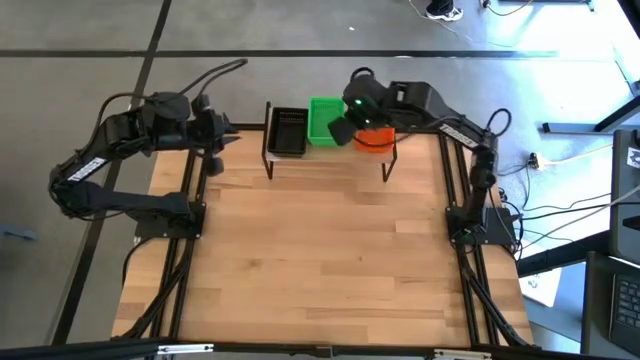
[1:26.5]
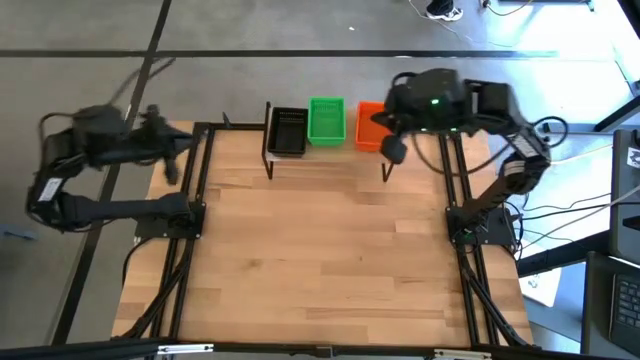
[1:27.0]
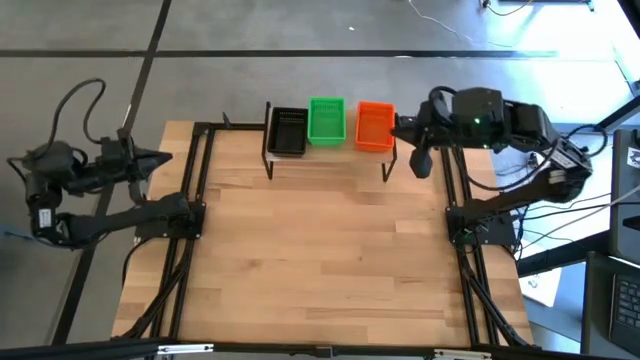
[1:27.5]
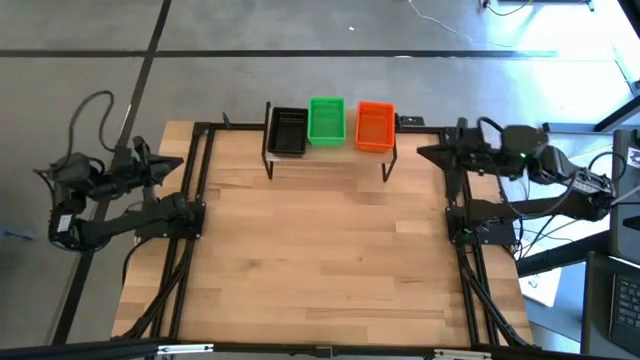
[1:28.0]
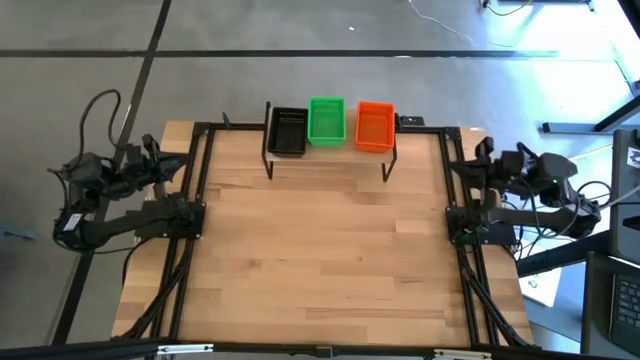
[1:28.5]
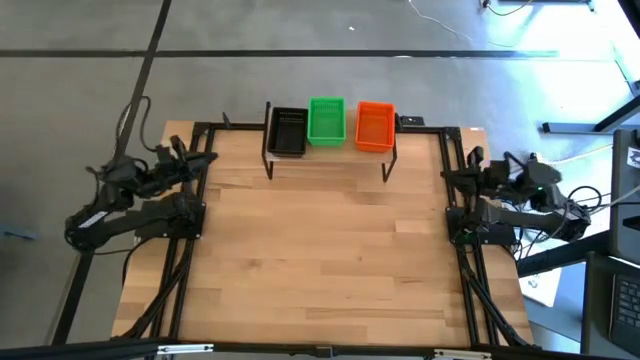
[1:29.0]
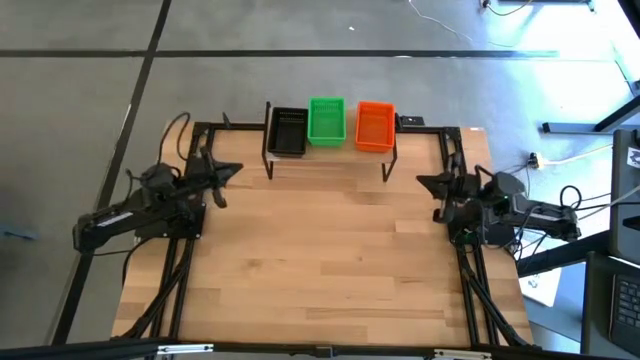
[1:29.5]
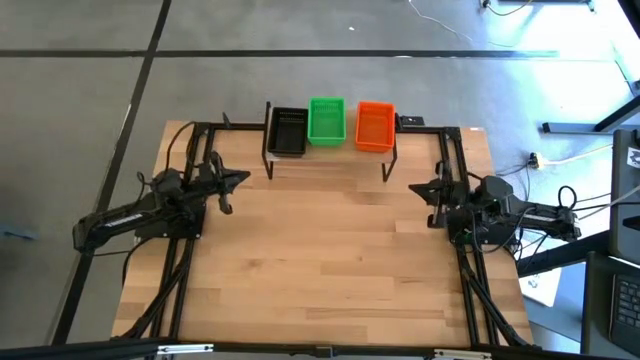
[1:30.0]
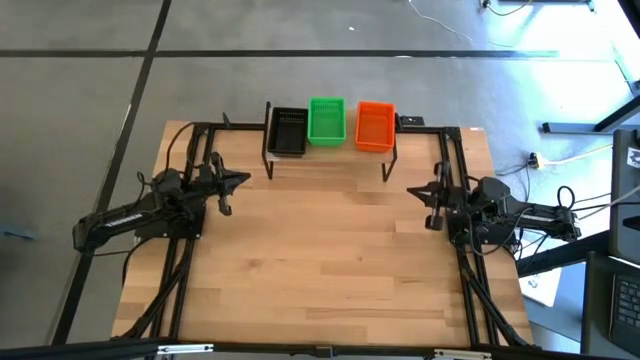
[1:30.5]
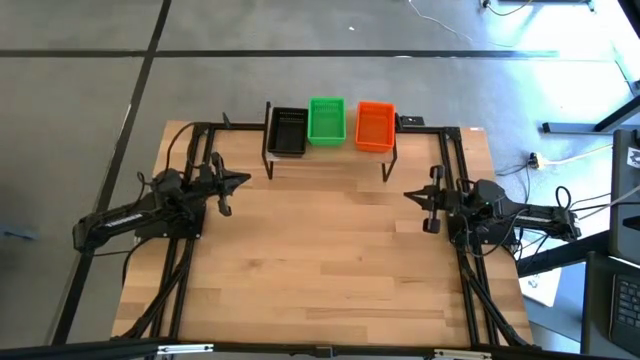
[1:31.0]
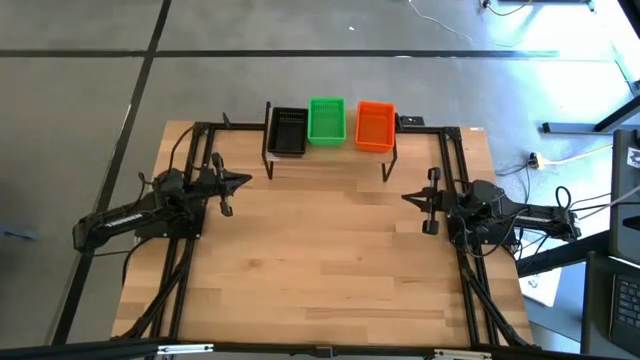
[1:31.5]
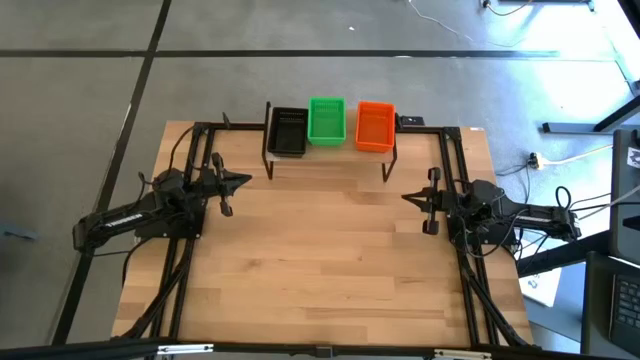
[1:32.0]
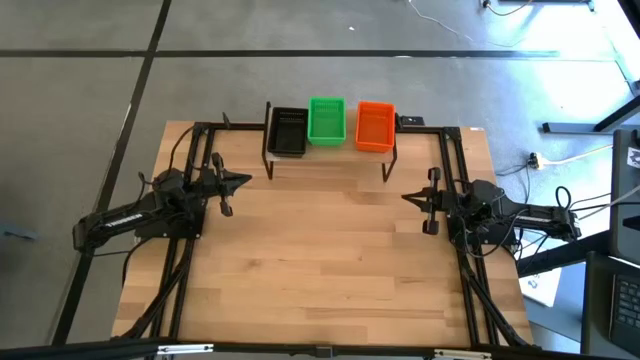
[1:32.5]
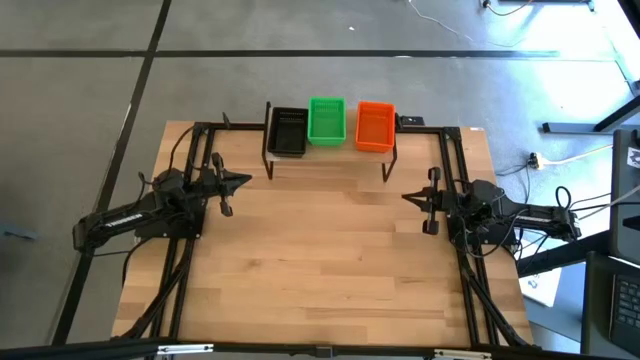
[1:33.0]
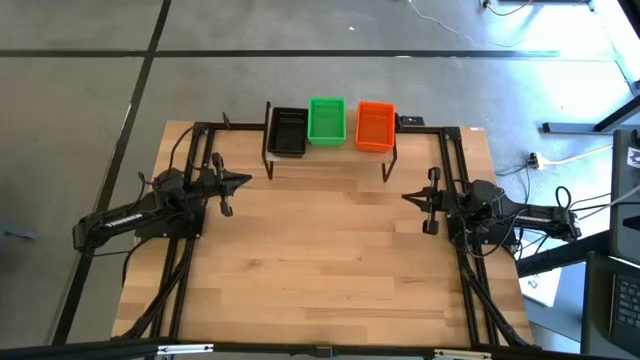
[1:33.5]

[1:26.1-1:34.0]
Task: Stack baskets on shelf by color
Return to Home Position

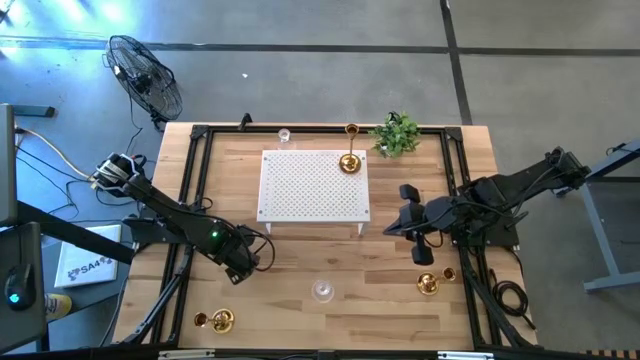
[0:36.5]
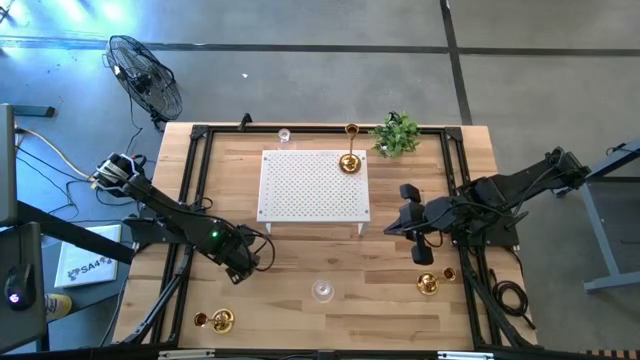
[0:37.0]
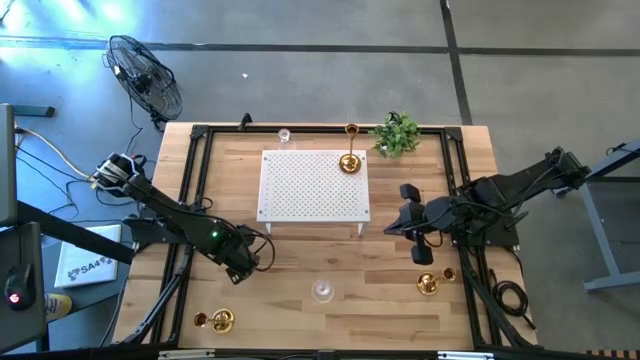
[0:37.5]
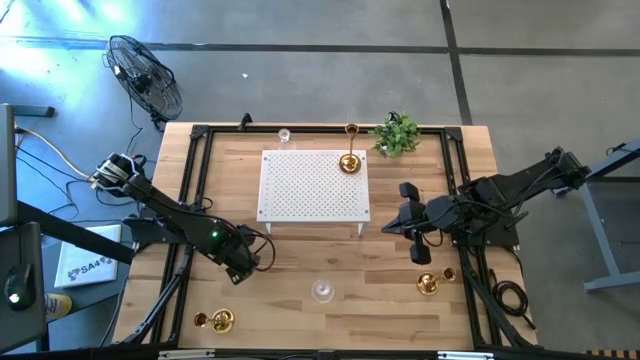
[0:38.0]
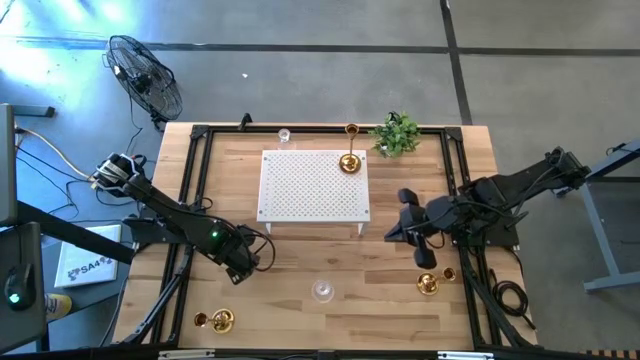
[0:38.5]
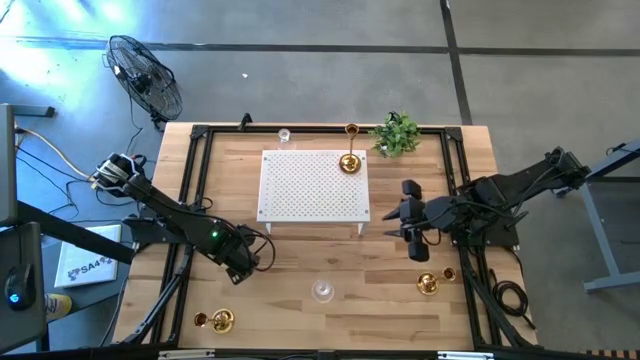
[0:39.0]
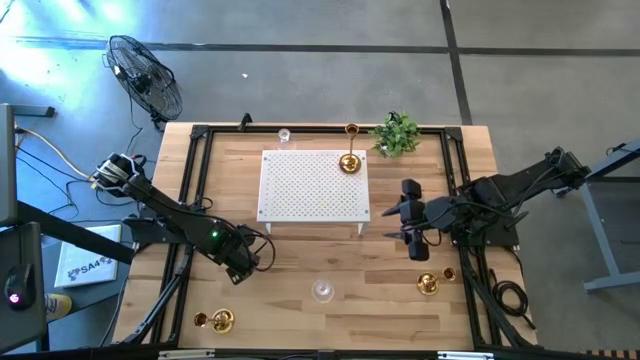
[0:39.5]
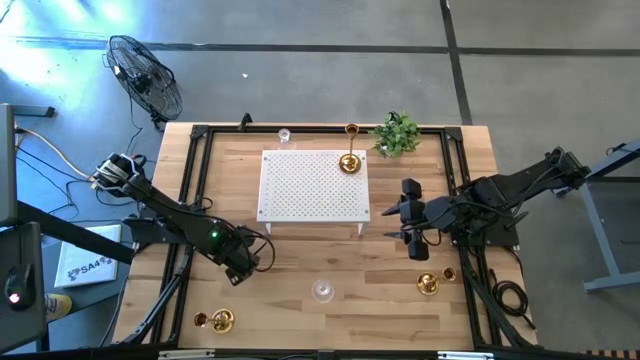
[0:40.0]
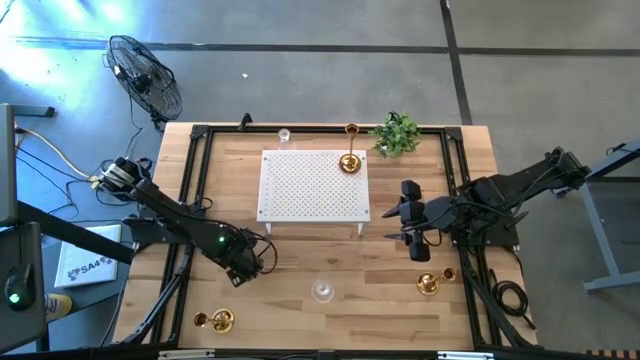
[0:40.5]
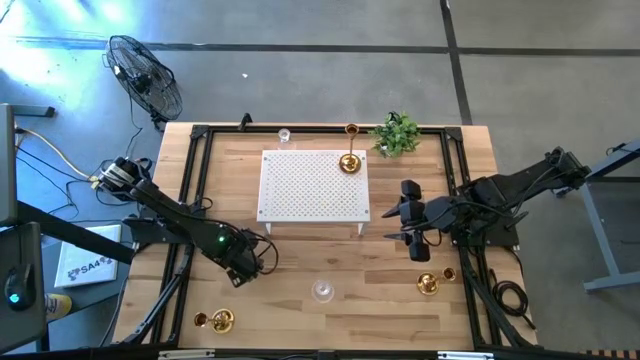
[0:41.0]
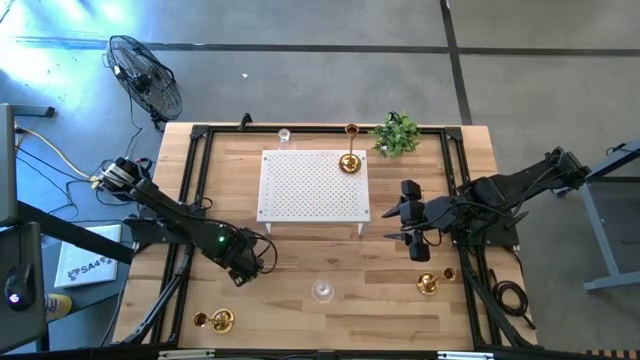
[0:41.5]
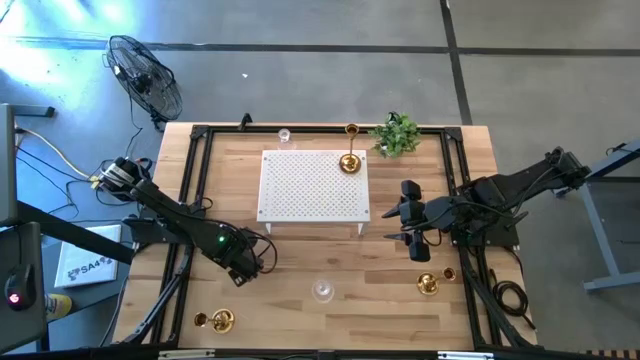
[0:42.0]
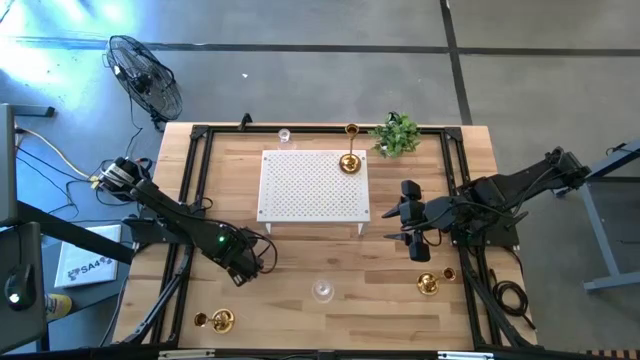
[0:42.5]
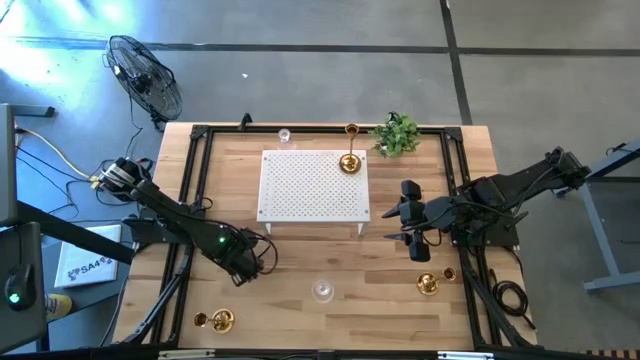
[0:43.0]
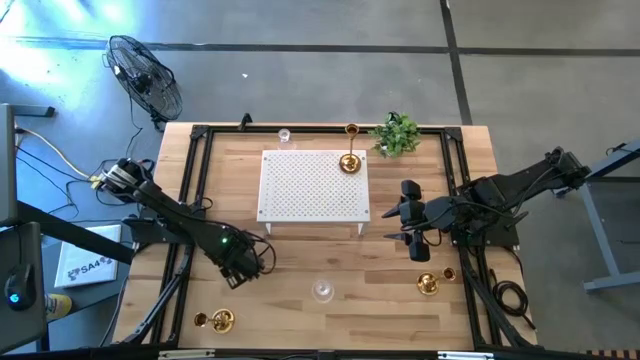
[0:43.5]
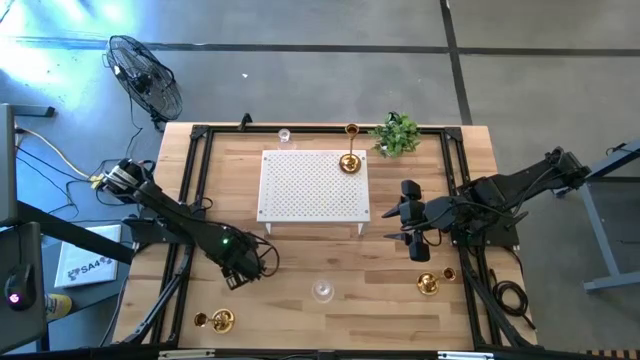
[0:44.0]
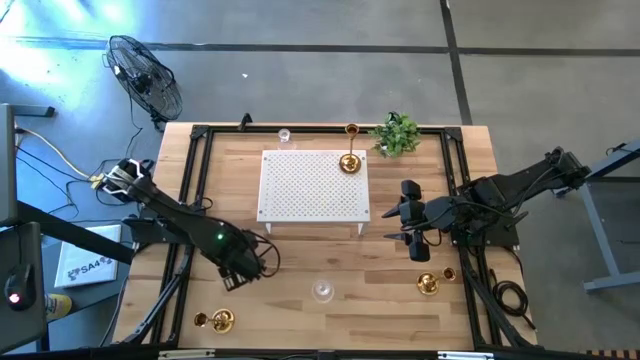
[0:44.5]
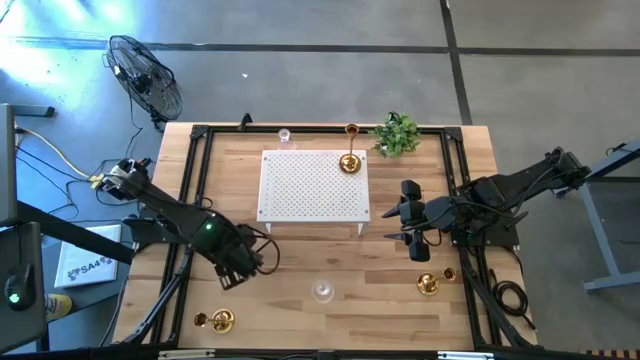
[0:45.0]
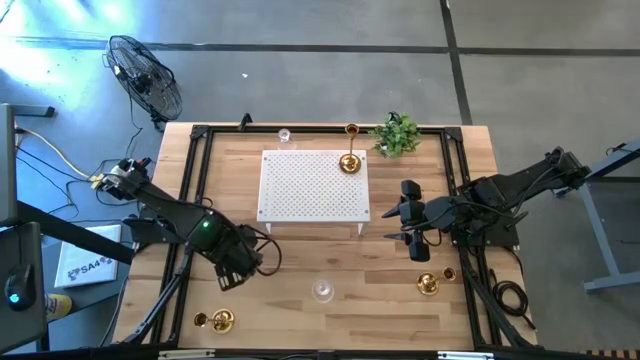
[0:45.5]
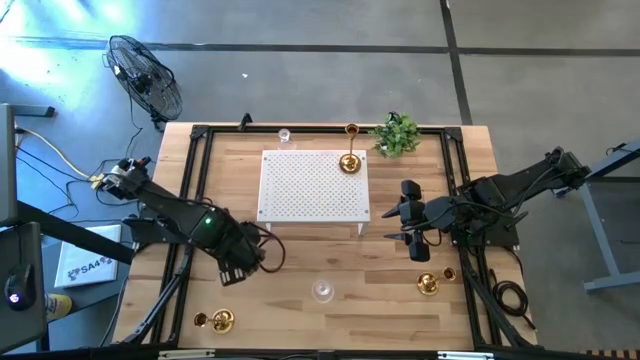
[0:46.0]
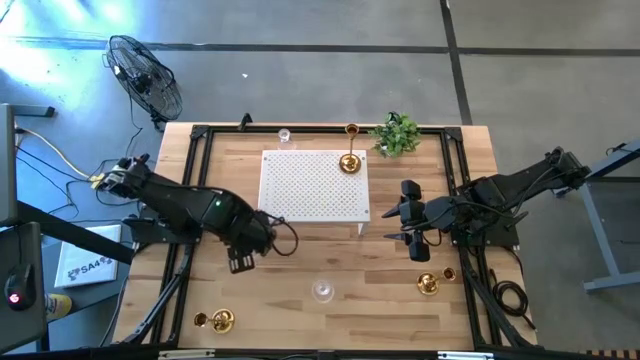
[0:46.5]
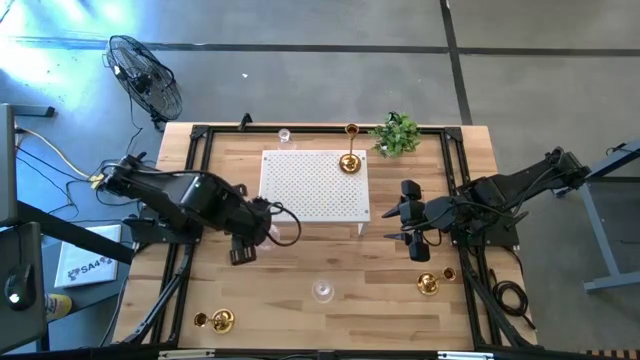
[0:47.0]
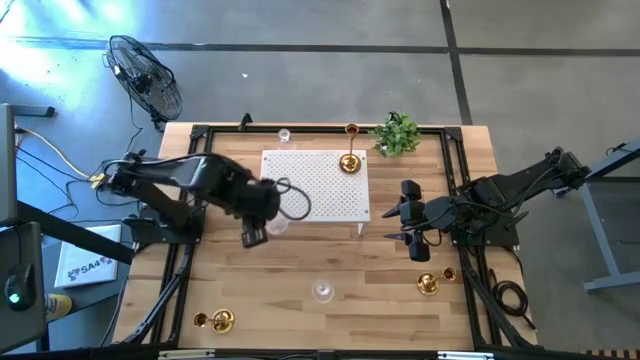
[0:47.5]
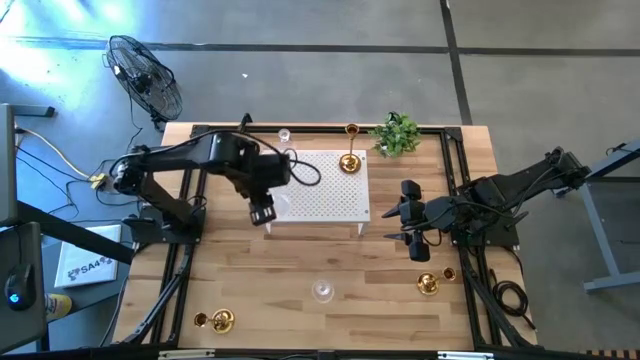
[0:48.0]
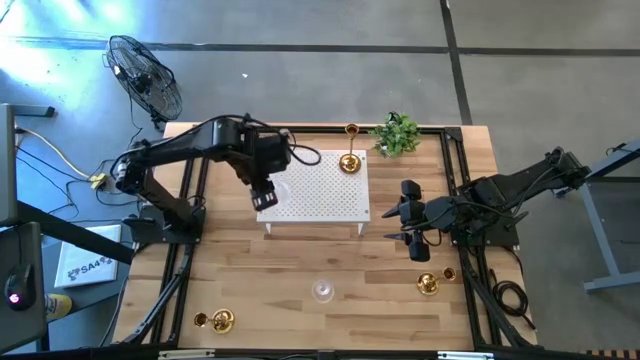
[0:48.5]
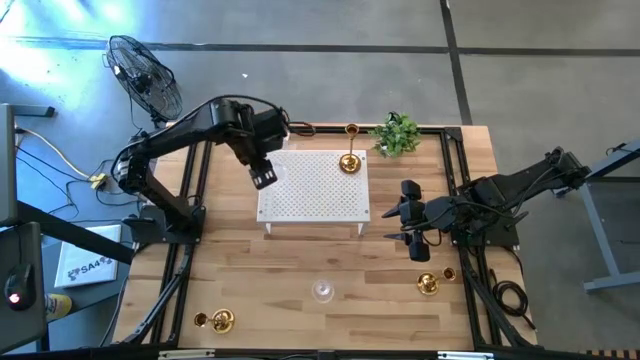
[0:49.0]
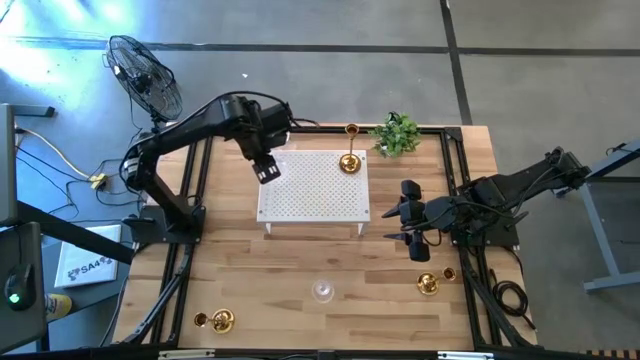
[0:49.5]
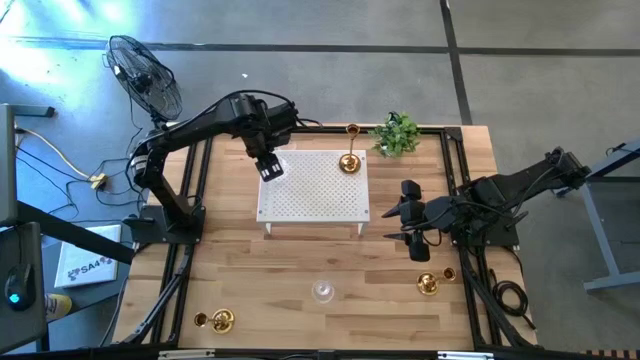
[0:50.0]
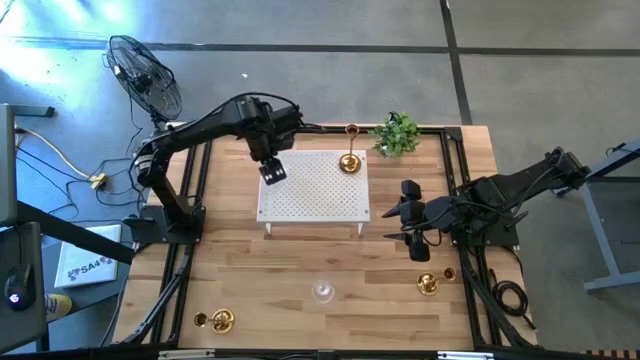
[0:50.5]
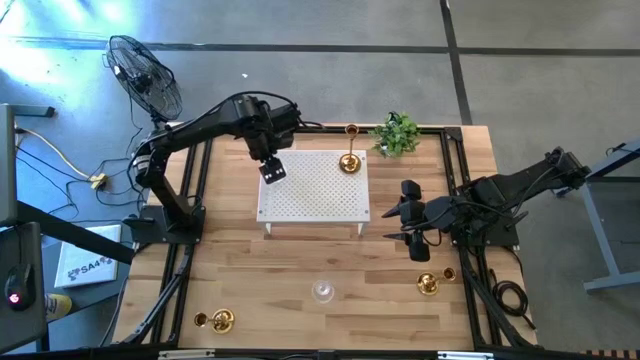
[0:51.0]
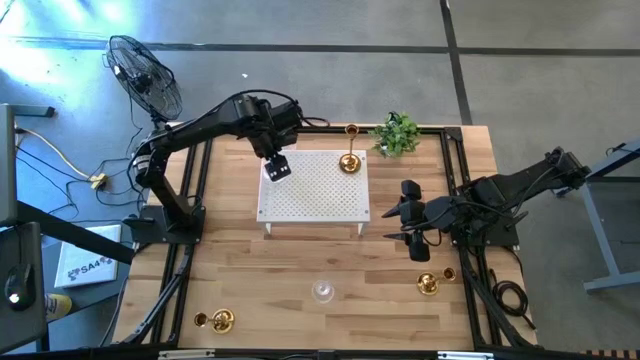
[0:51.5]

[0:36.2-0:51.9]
Task: Pick & Place candle stick holders
Put the middle left transparent glass candle holder on the shelf
